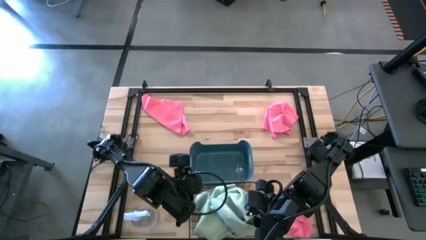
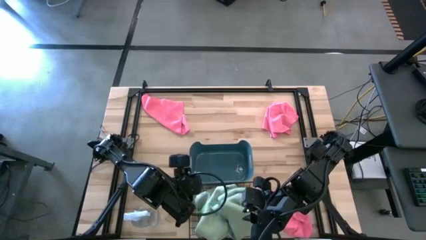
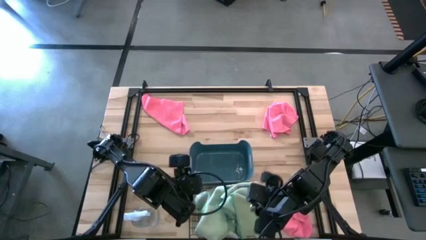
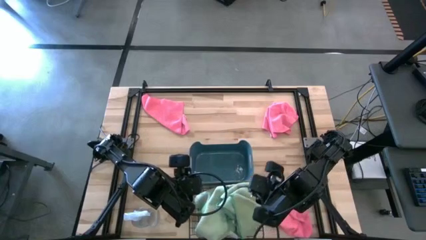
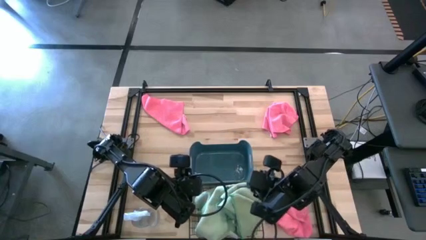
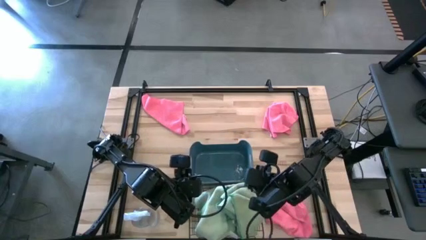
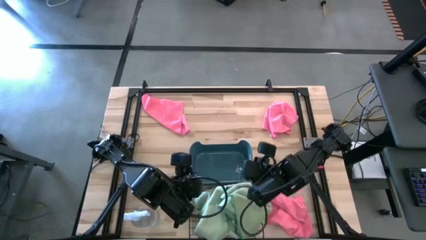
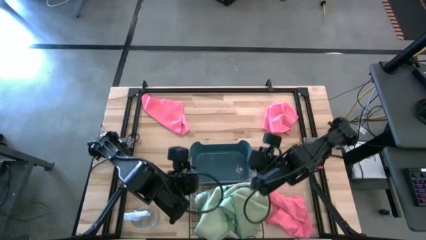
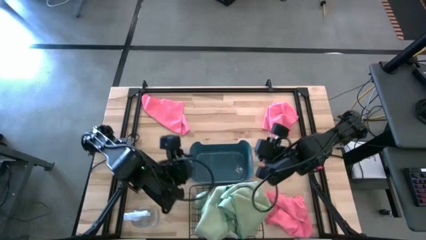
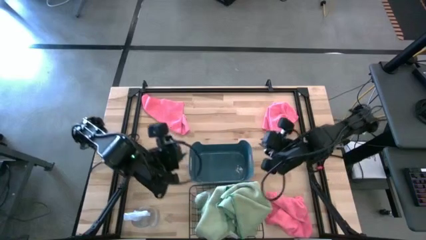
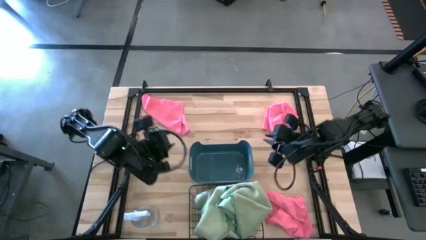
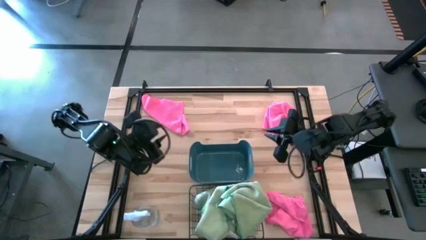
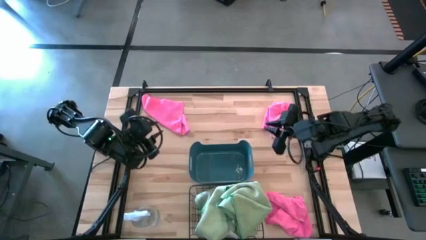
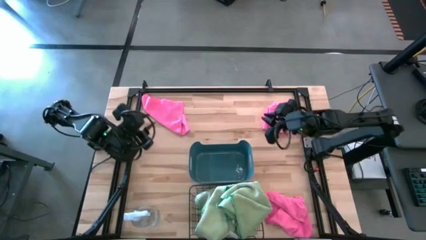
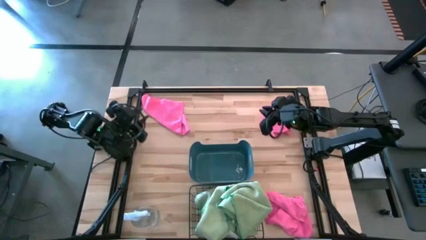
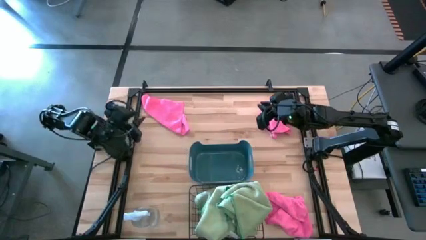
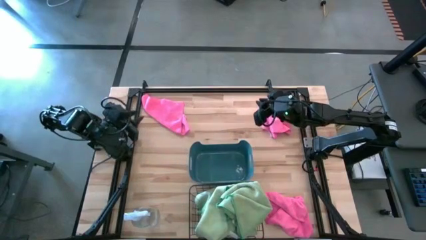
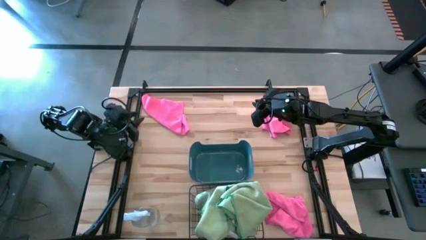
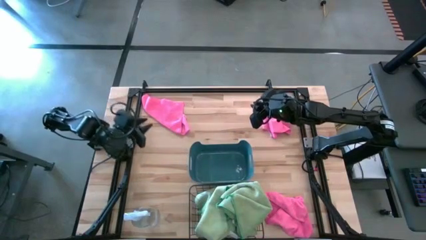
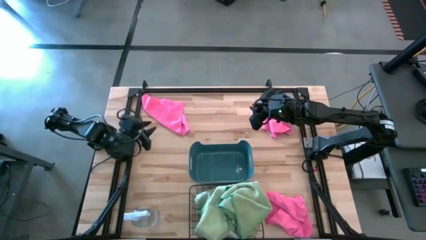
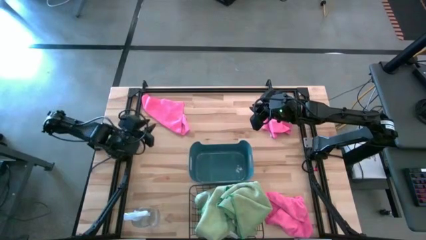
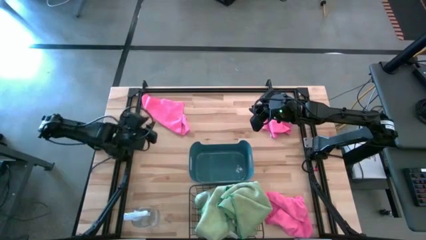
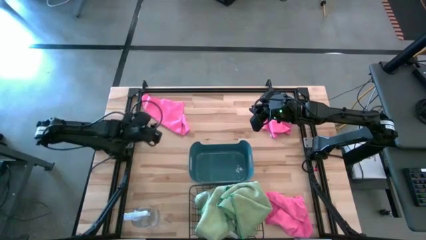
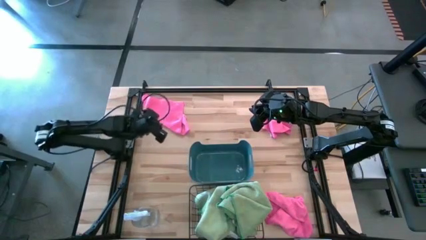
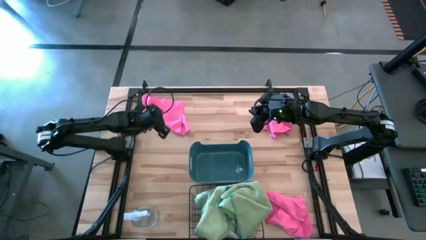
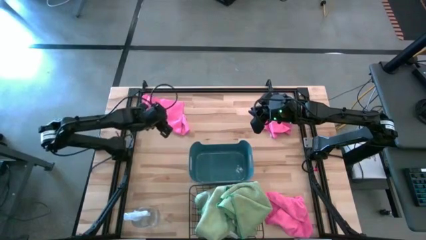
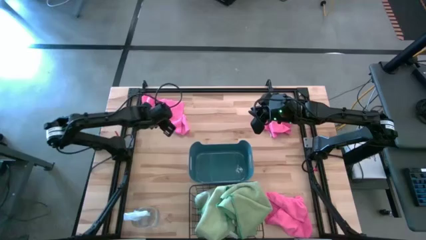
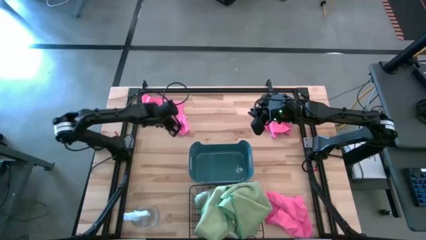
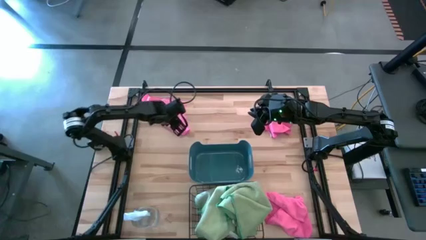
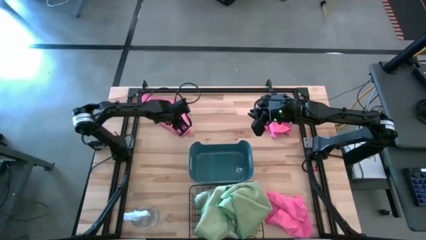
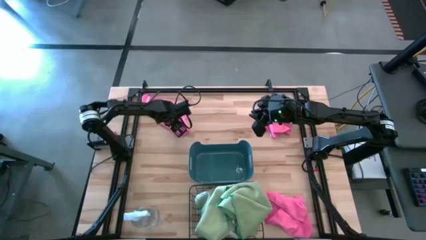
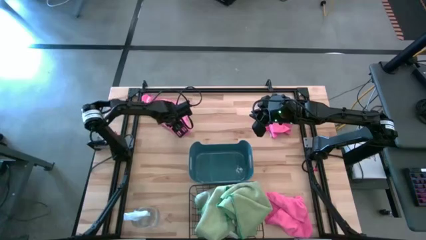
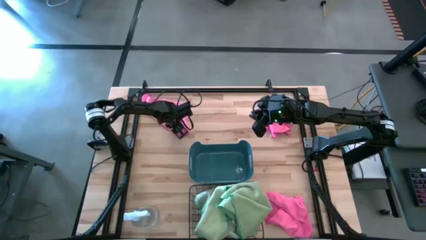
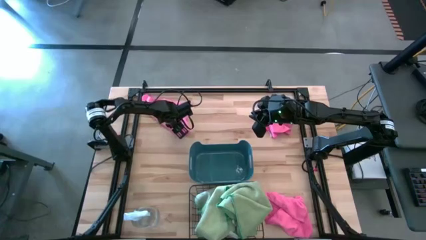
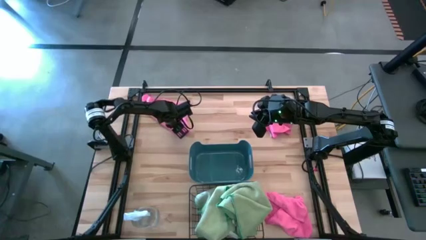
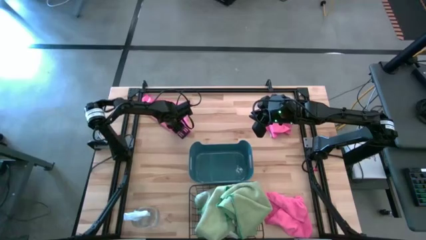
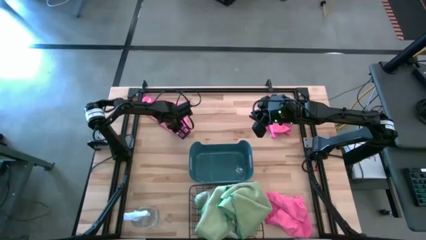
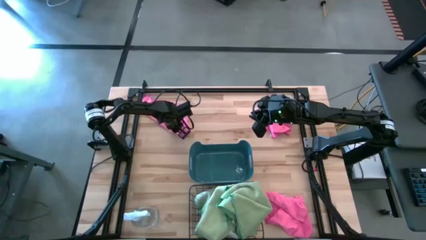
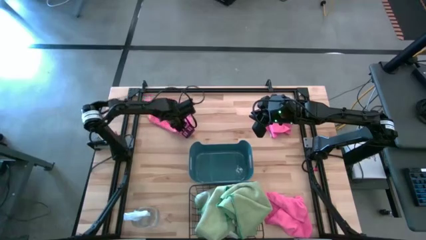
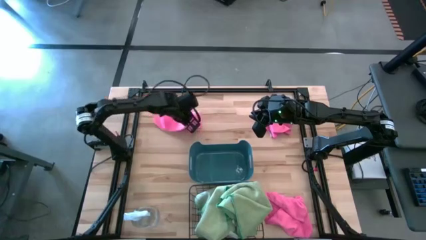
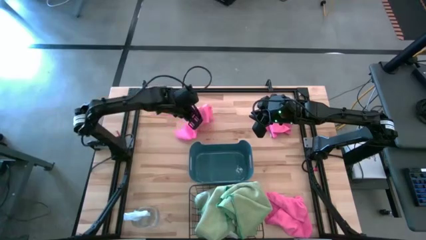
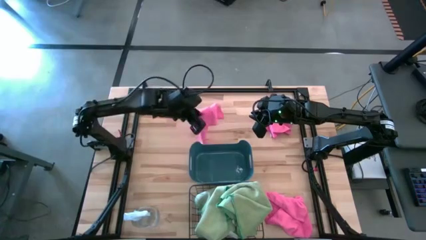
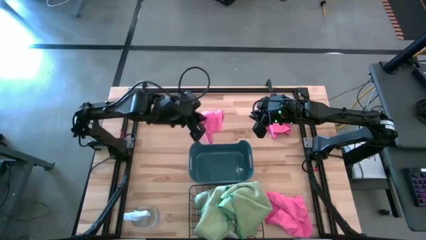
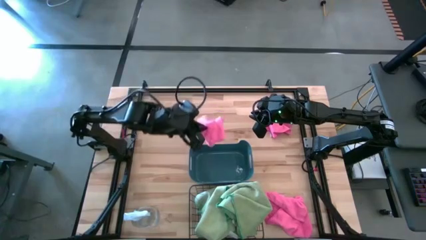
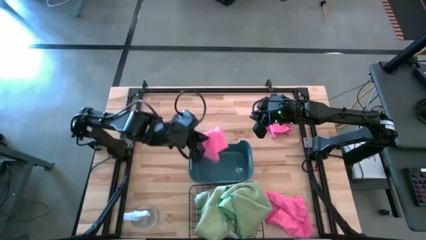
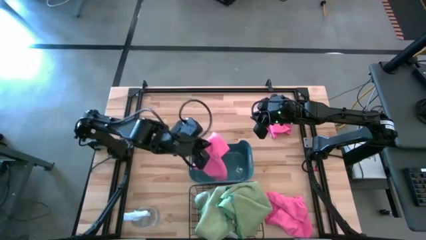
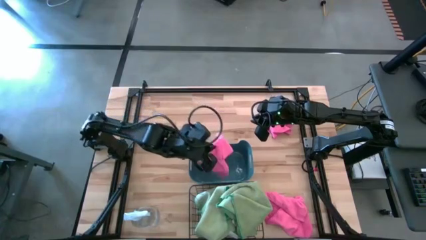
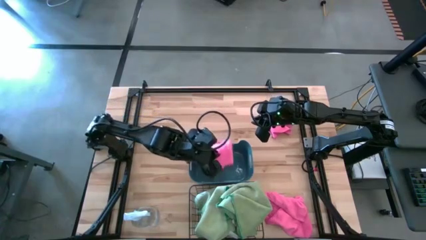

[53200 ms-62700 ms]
Task: Sort microfiber towel by color & place in baskets
Put the top left microfiber pink towel into the blue bin

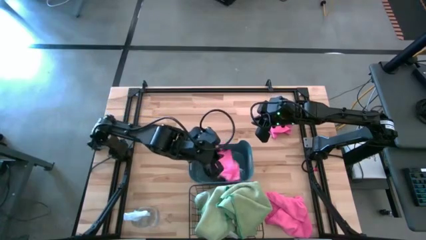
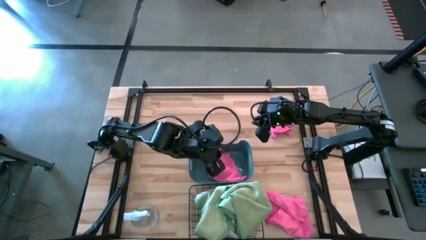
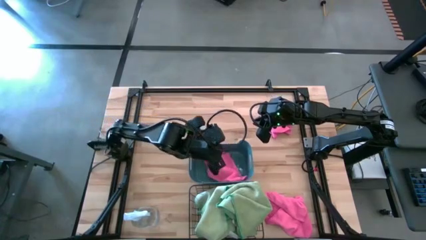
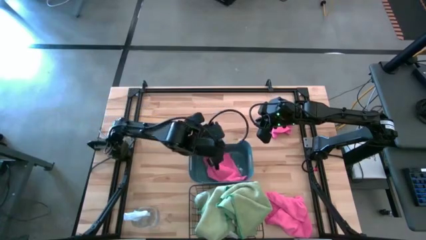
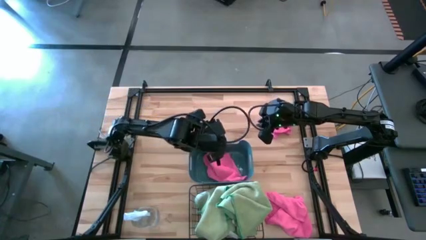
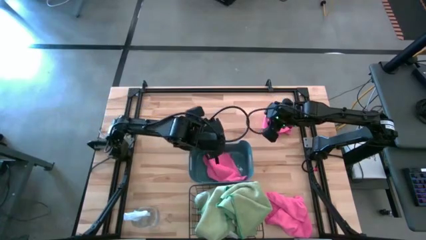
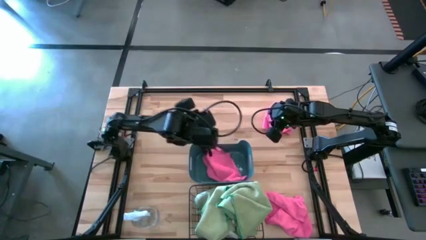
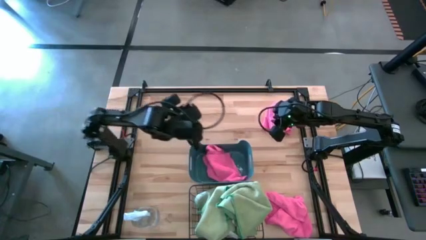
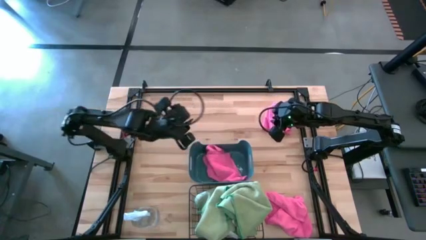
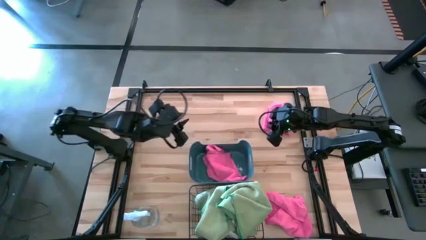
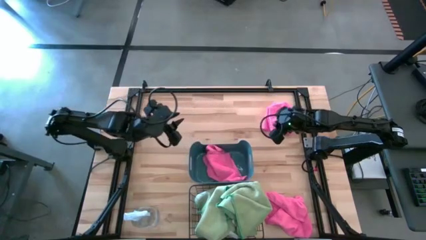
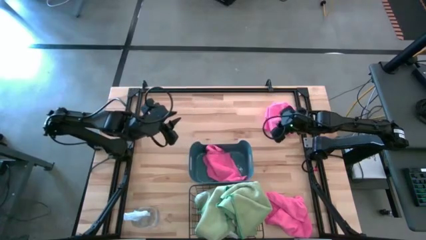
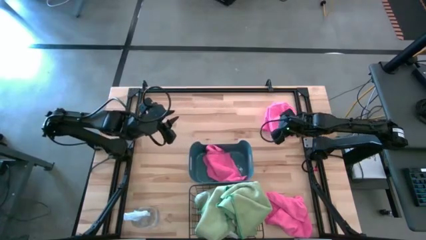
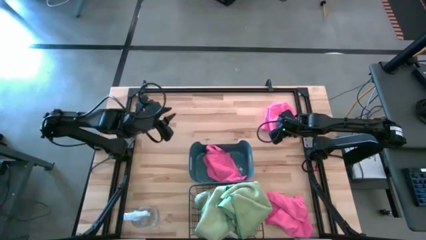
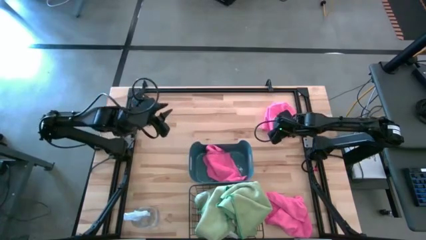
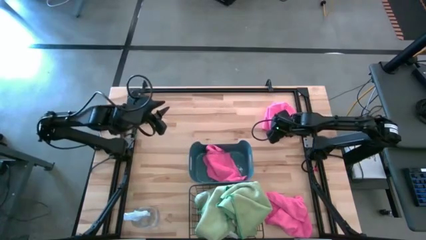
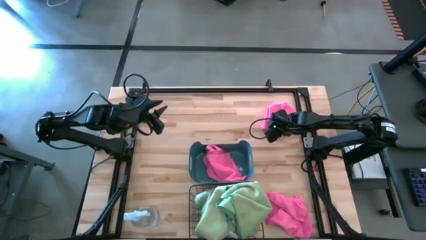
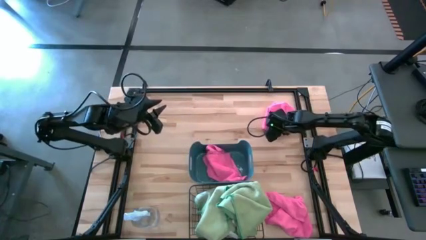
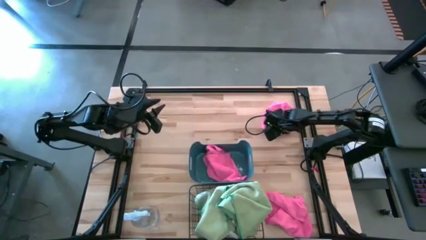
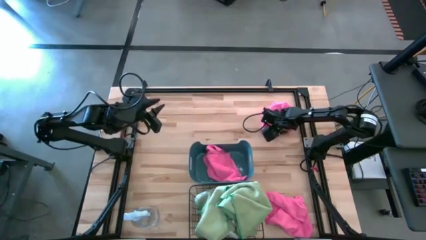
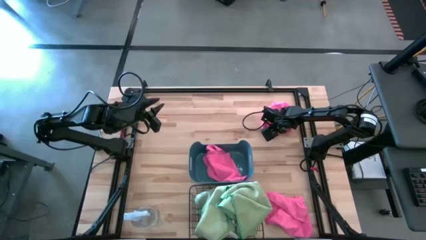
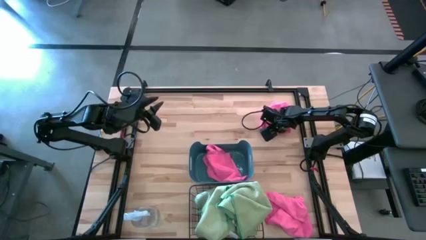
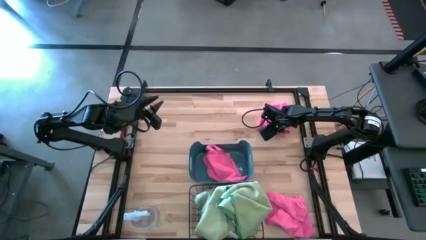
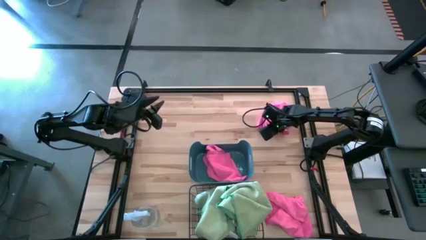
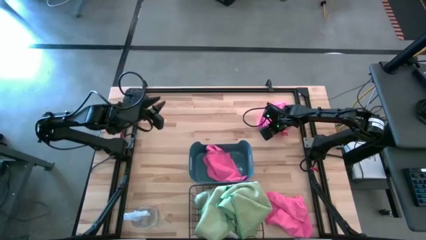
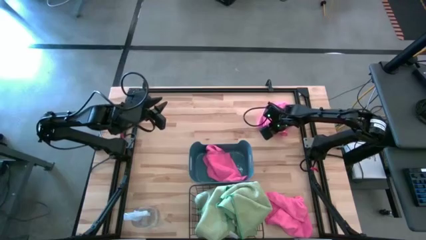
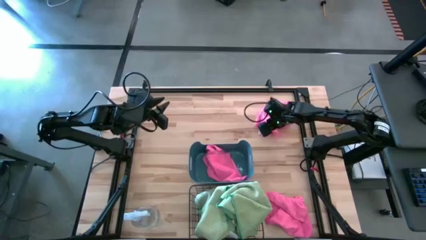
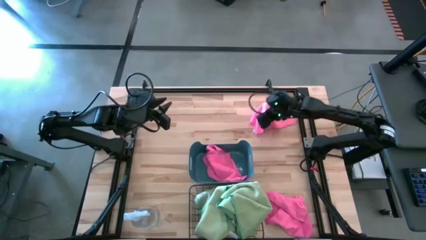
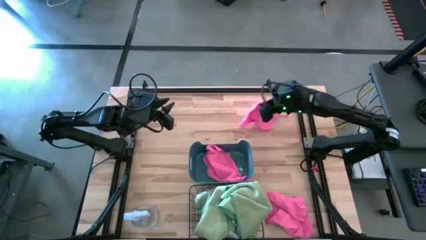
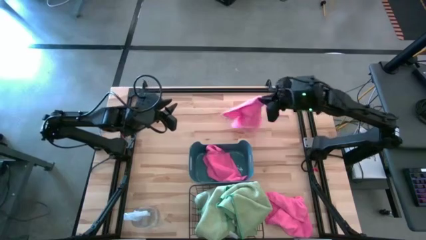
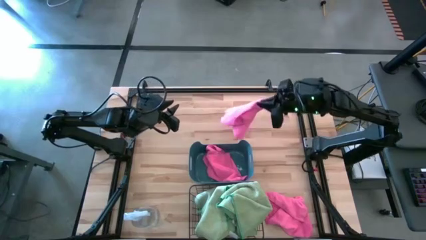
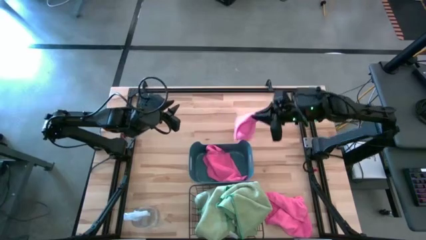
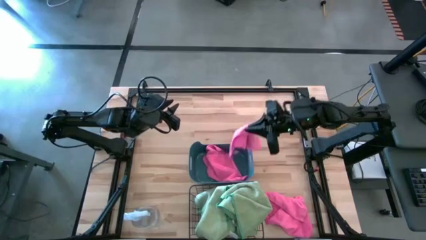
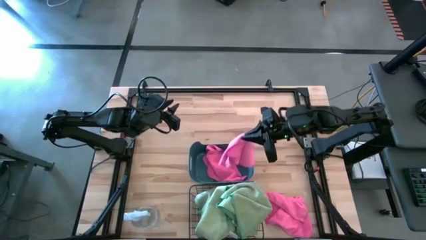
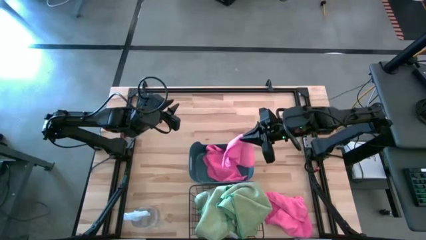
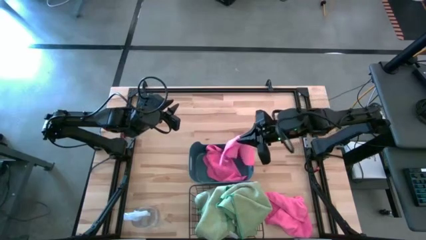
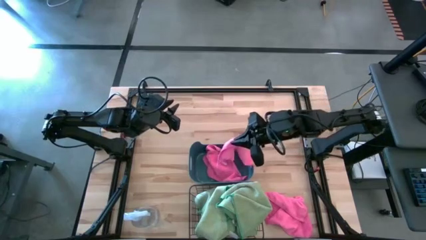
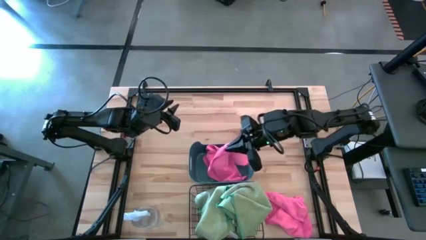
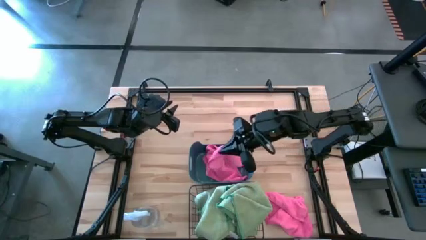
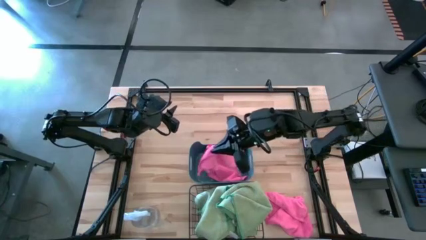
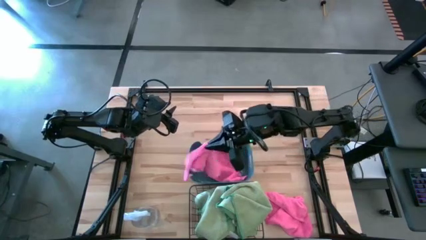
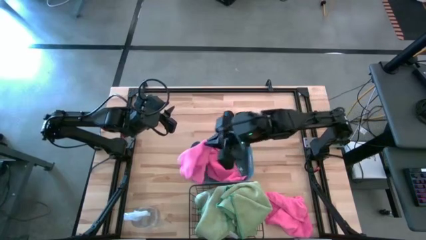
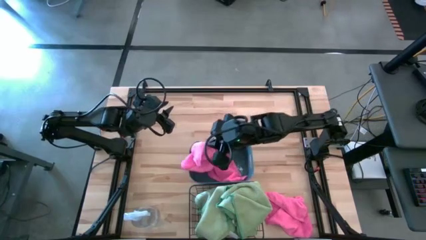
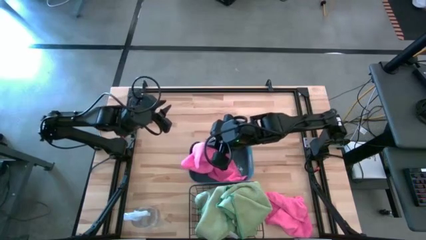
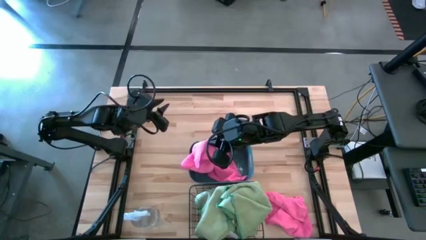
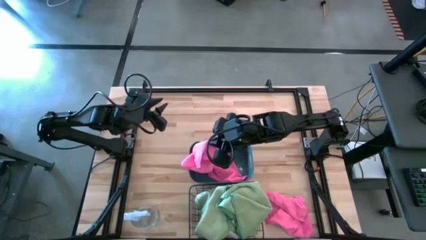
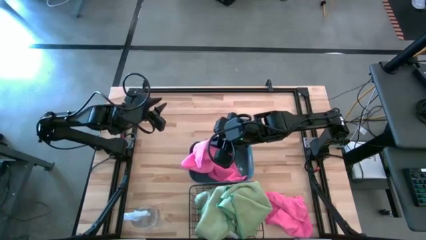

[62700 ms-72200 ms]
Put the top pink microfiber towel into the blue bin
